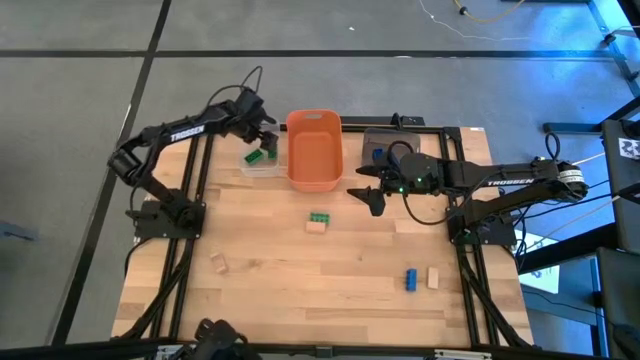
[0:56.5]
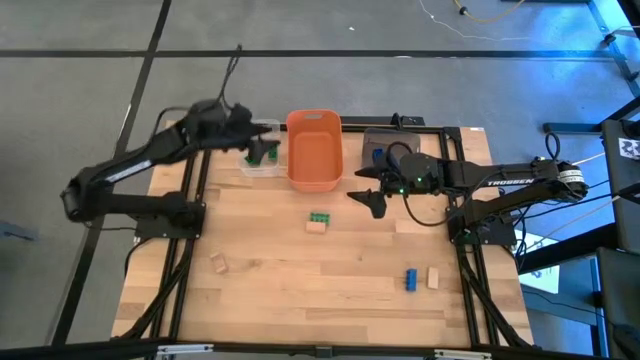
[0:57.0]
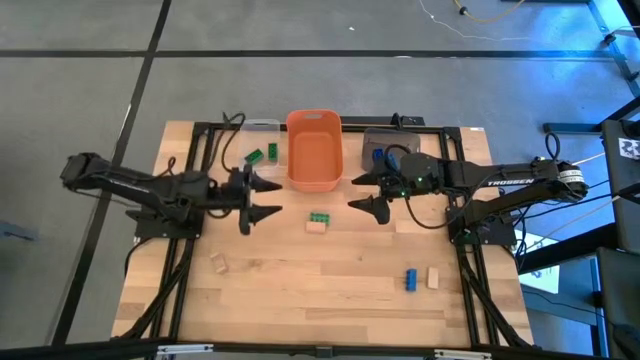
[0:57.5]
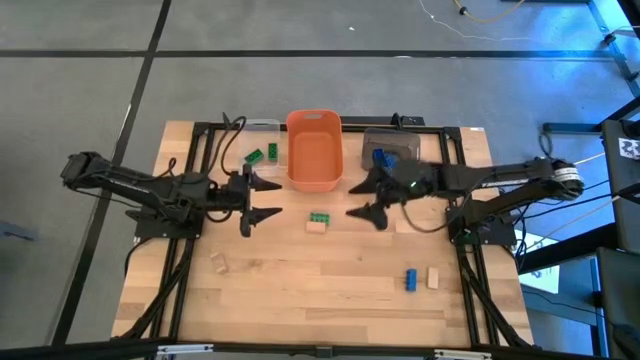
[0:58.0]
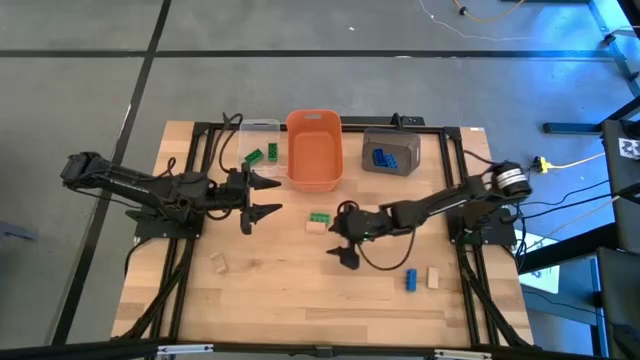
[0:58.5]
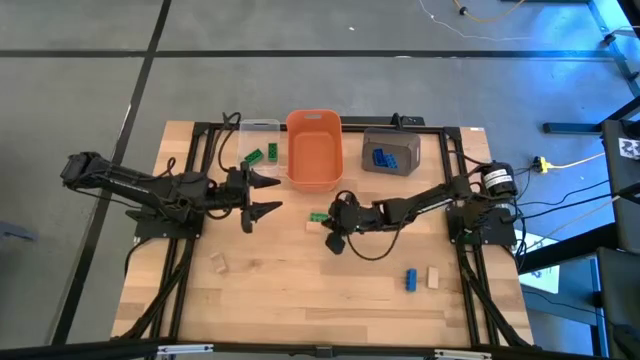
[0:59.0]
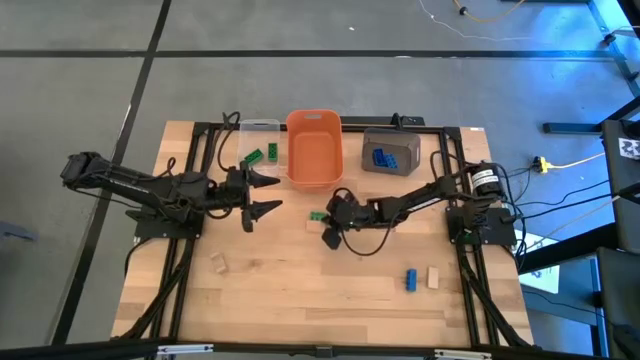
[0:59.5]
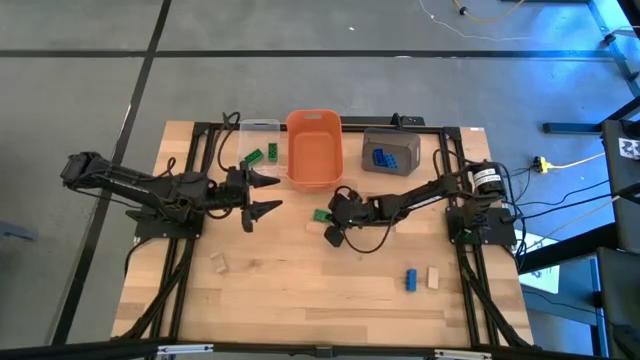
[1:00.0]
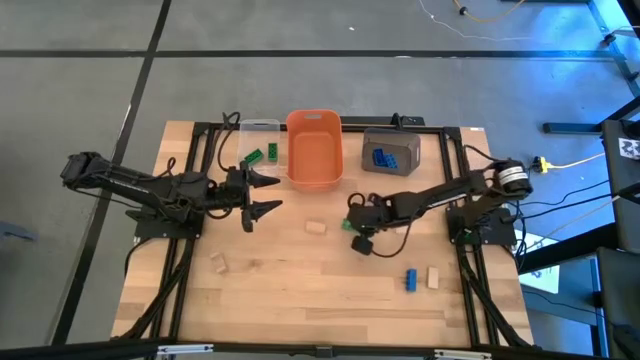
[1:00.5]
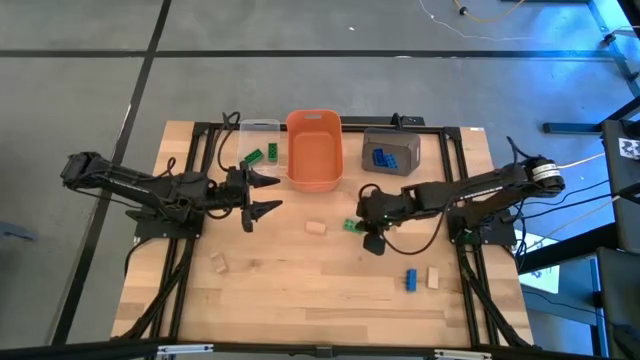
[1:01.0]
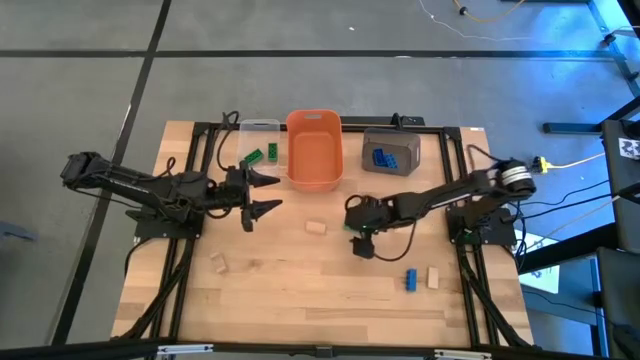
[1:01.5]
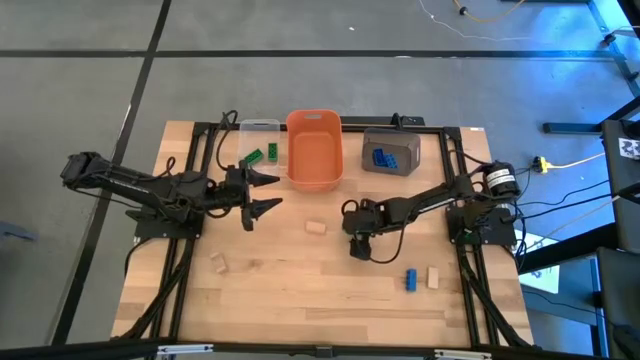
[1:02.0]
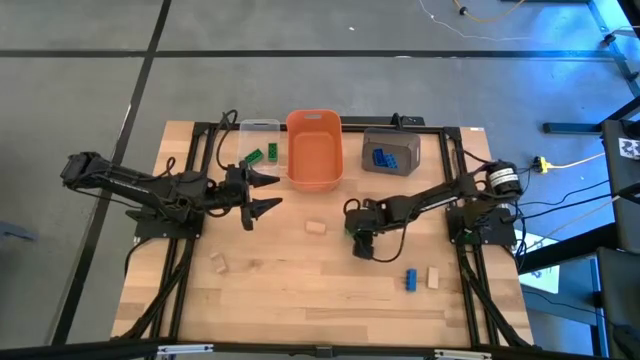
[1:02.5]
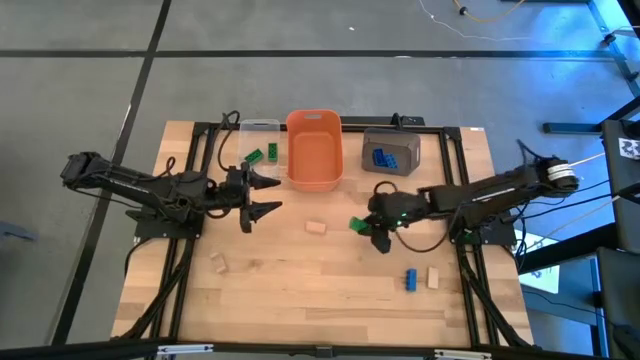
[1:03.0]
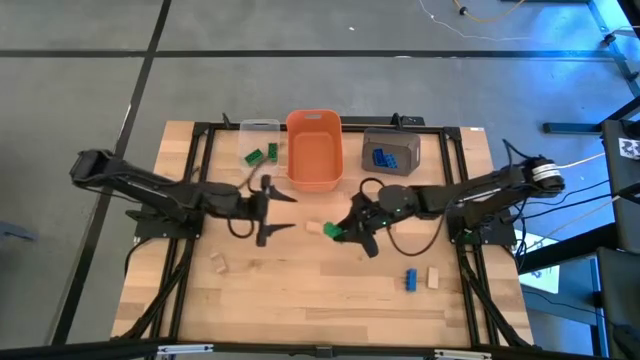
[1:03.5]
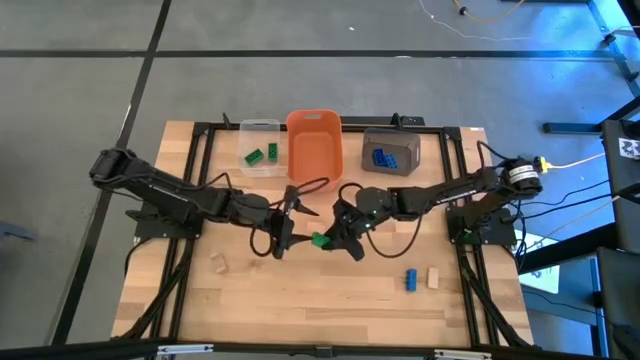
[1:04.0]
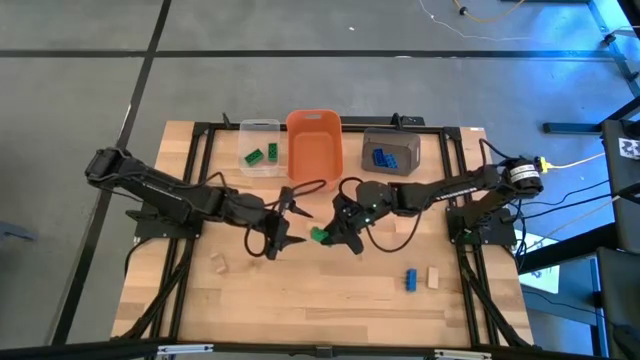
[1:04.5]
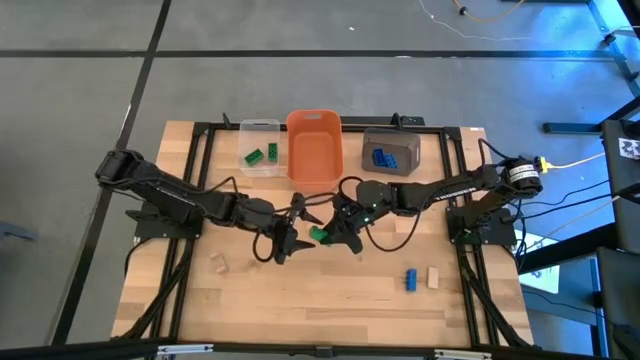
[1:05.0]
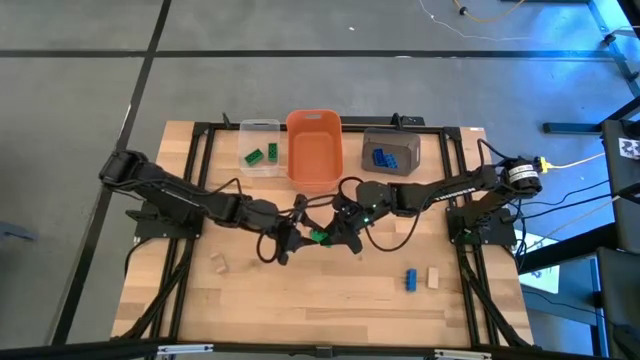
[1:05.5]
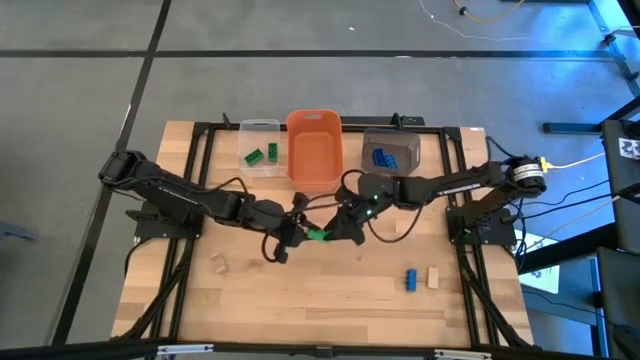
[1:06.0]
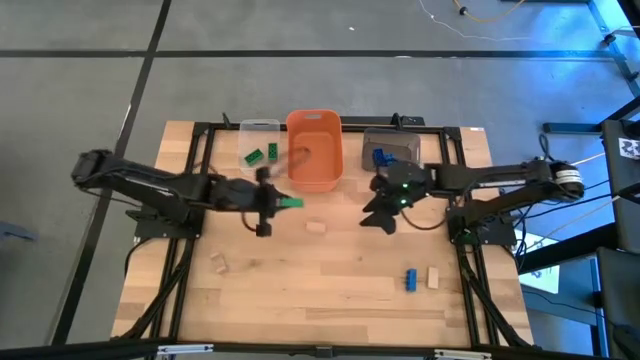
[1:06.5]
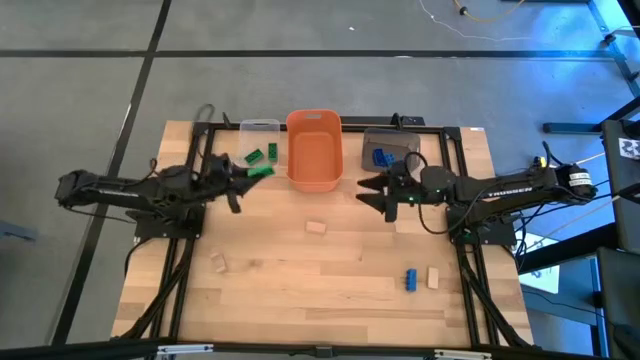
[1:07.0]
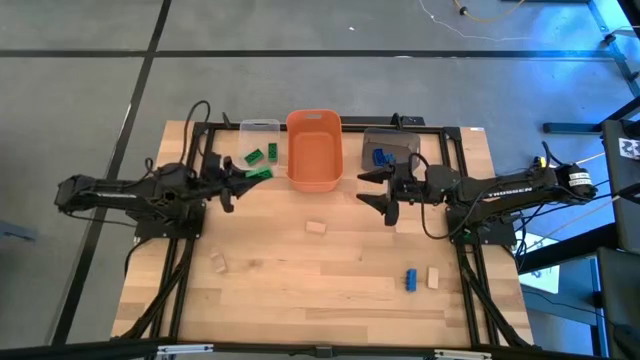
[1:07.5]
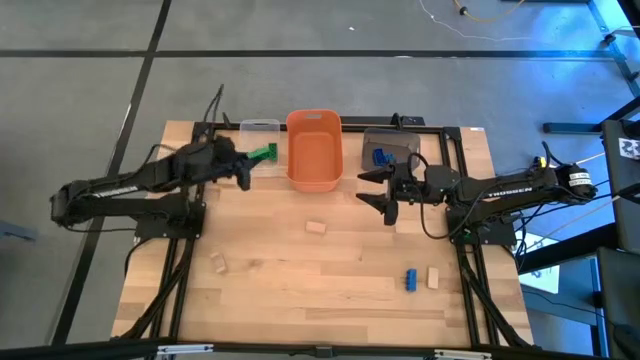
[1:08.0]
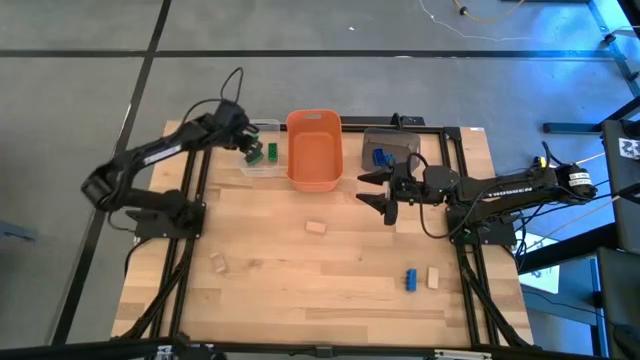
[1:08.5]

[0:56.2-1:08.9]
Task: Sort & place blocks by color
Put the green game piece into the transparent bin

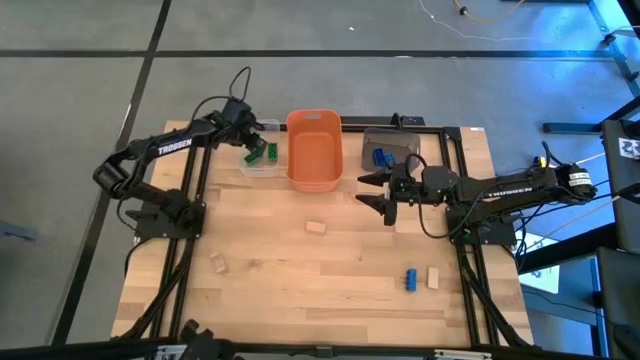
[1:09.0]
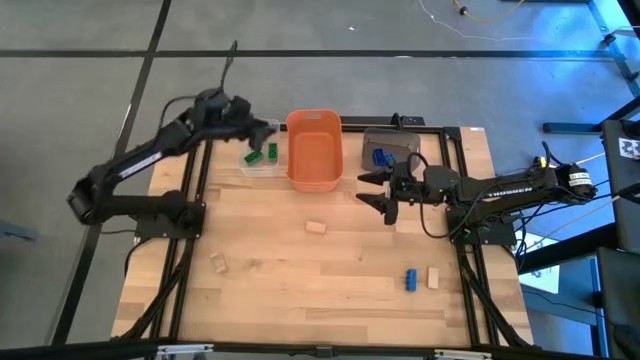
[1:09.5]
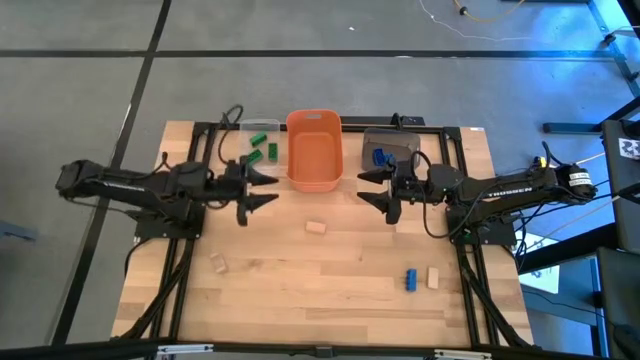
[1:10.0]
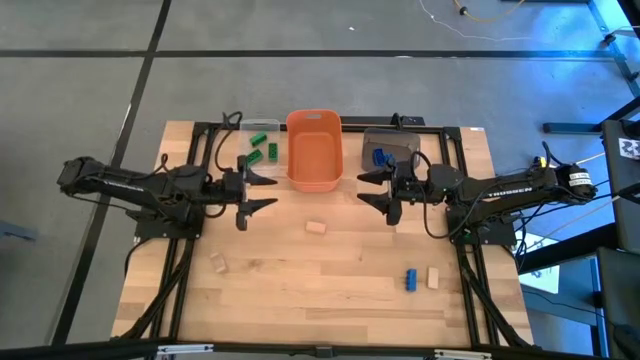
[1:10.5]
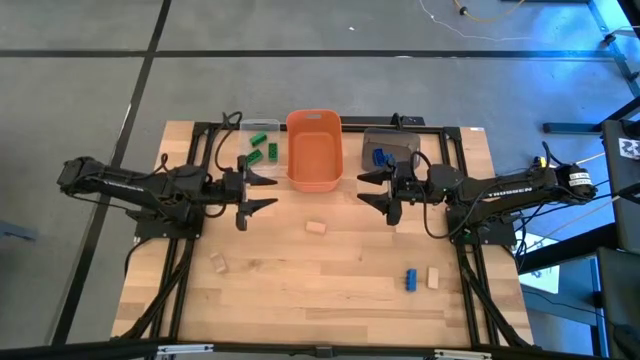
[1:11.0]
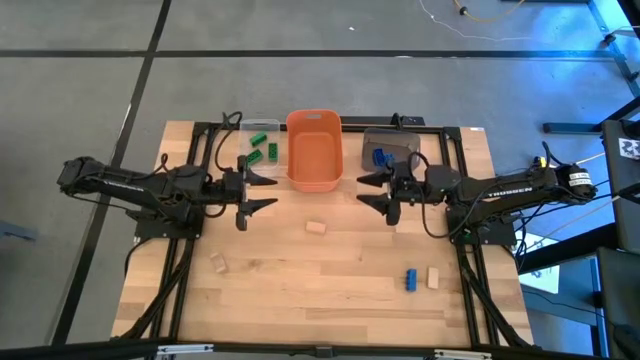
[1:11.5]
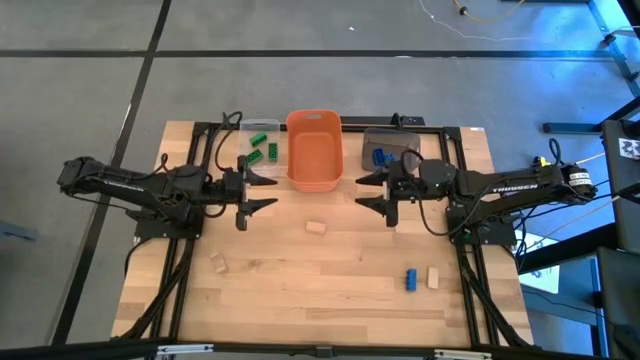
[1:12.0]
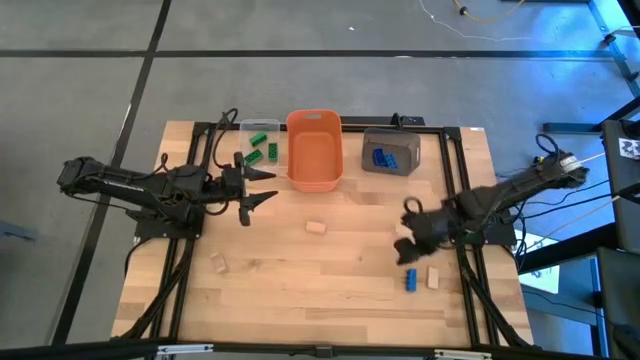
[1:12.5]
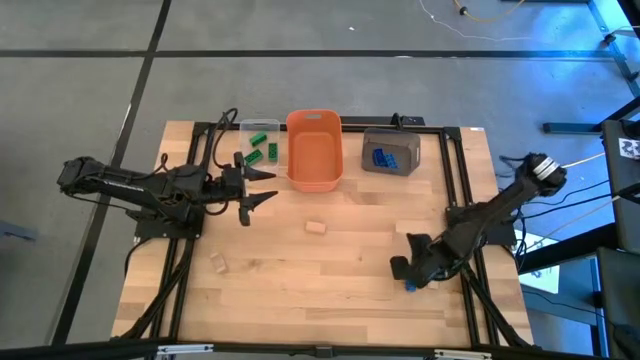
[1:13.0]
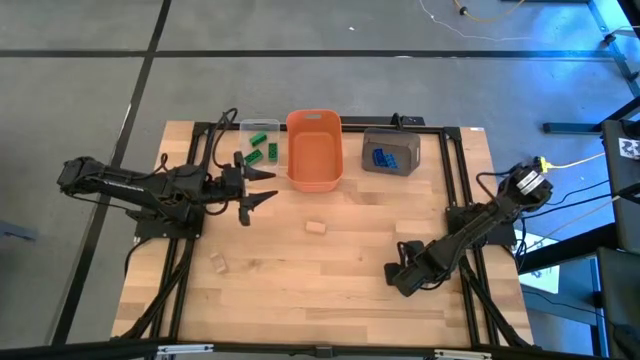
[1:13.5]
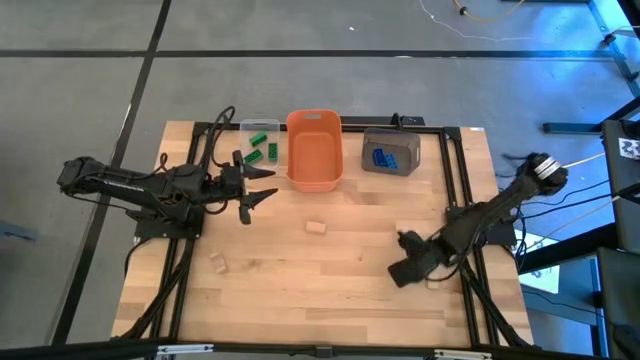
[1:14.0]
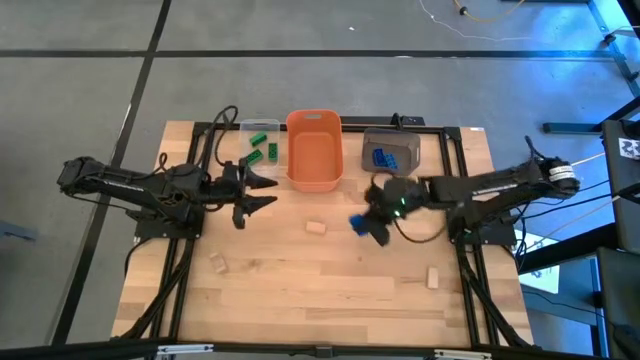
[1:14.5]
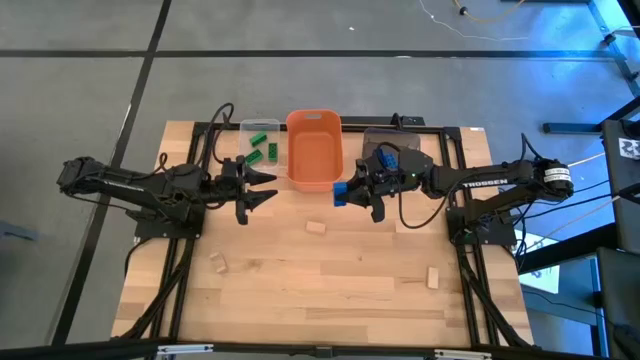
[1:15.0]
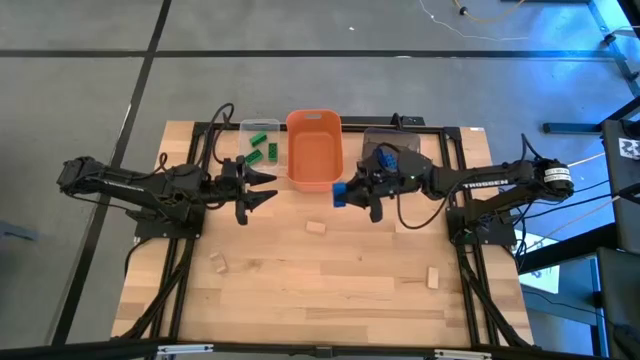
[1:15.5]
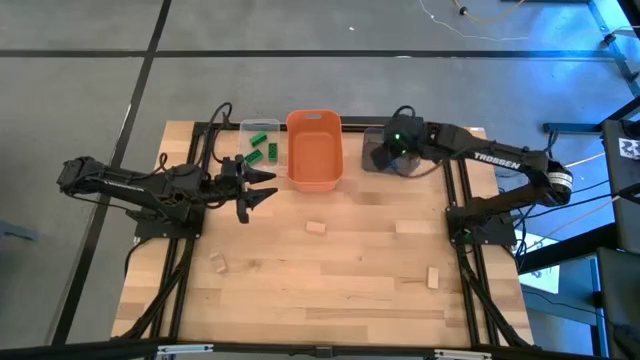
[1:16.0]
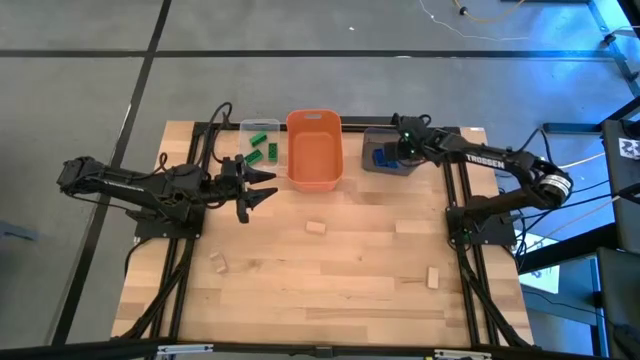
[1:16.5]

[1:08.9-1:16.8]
Put the blue game piece into the black bin
